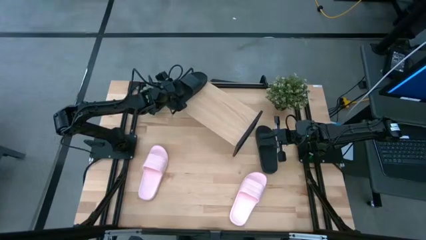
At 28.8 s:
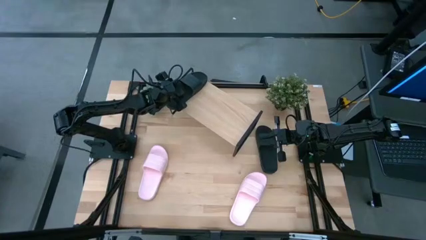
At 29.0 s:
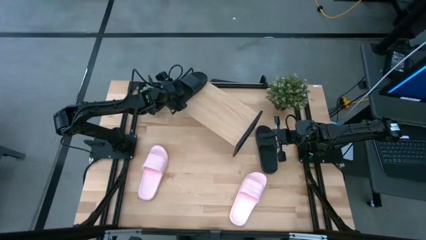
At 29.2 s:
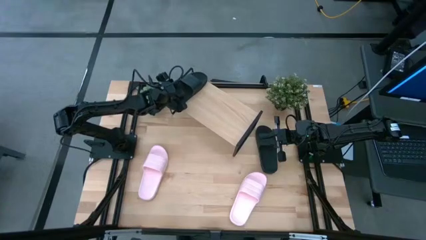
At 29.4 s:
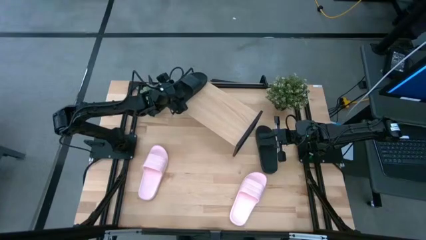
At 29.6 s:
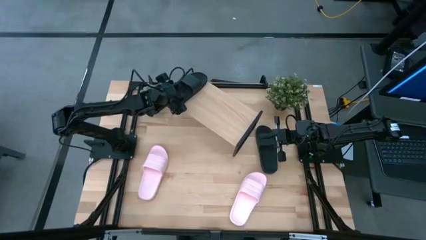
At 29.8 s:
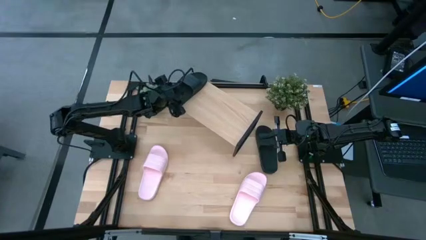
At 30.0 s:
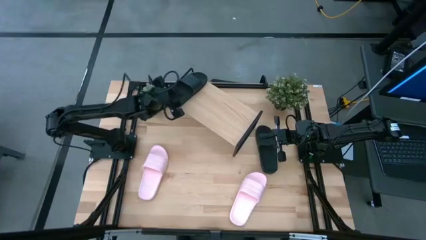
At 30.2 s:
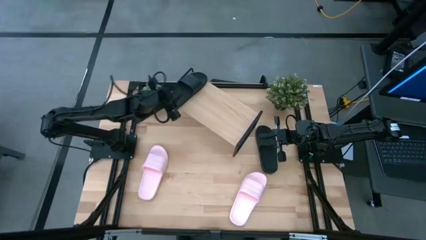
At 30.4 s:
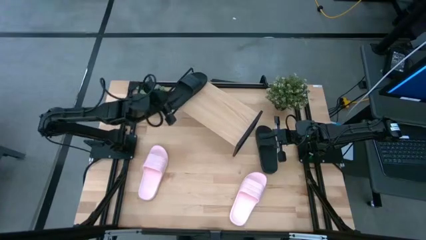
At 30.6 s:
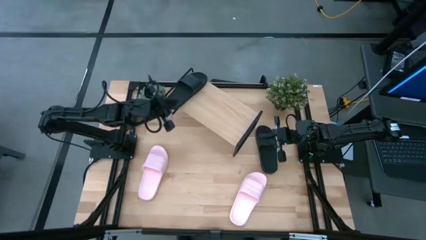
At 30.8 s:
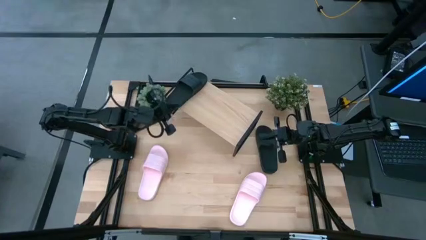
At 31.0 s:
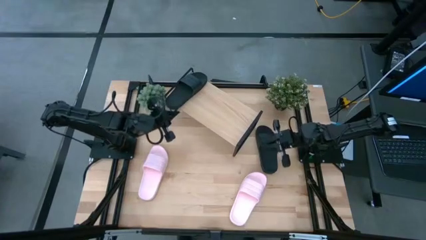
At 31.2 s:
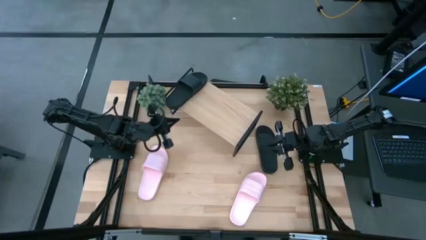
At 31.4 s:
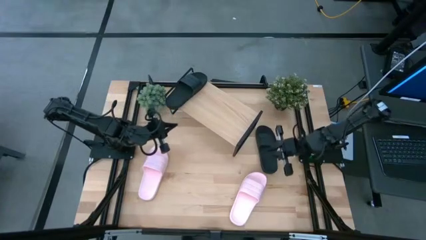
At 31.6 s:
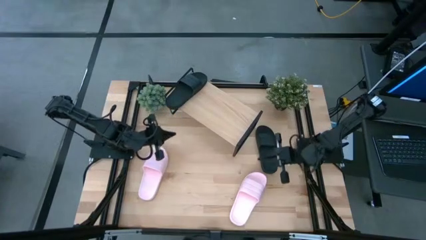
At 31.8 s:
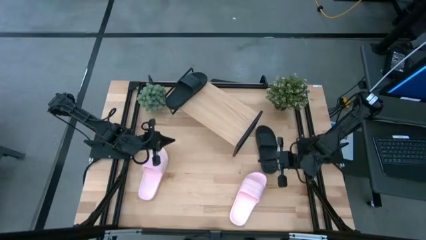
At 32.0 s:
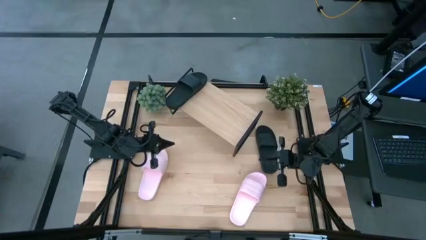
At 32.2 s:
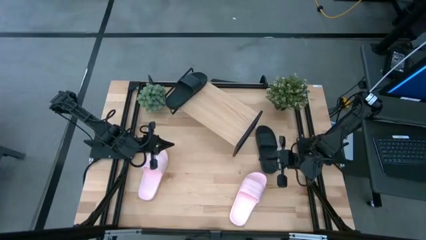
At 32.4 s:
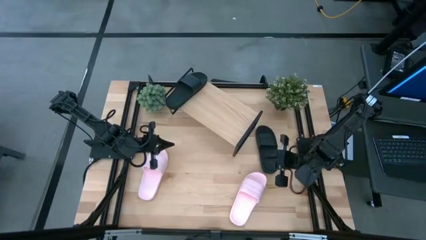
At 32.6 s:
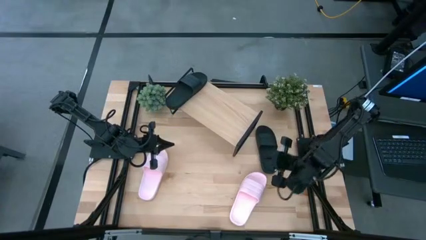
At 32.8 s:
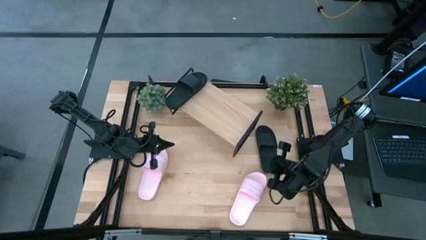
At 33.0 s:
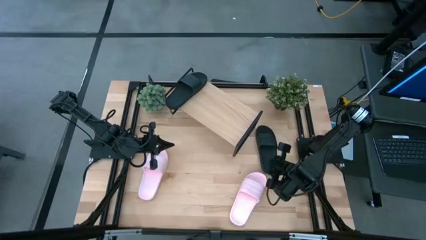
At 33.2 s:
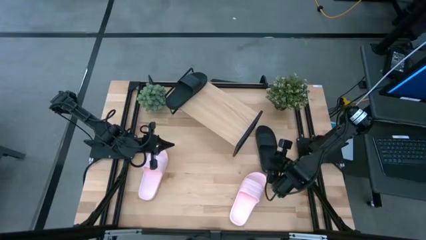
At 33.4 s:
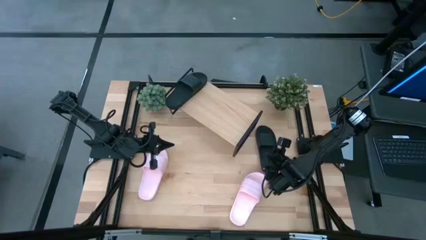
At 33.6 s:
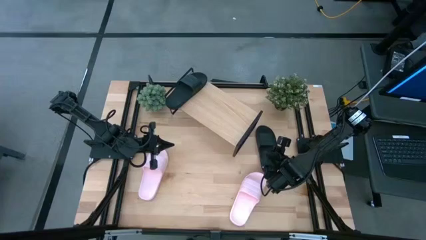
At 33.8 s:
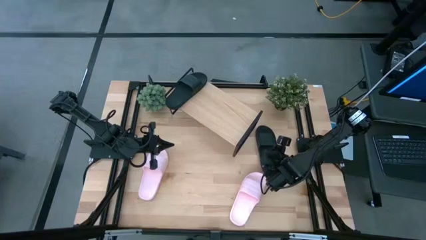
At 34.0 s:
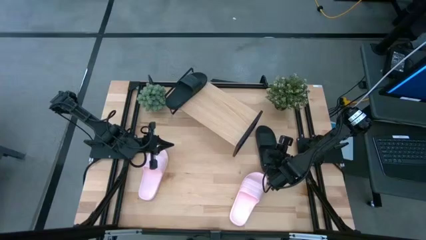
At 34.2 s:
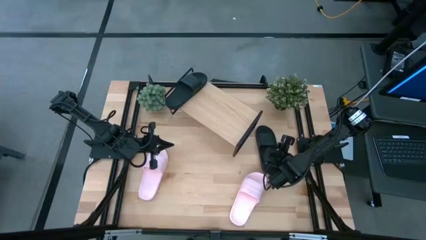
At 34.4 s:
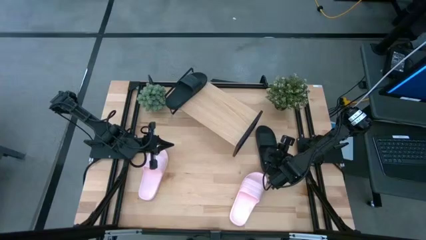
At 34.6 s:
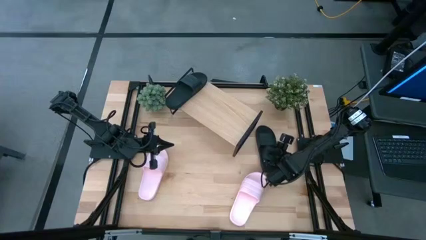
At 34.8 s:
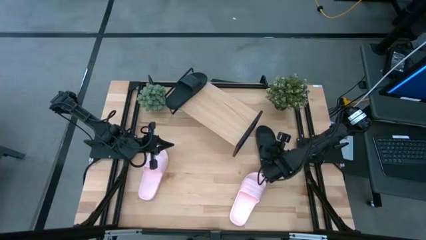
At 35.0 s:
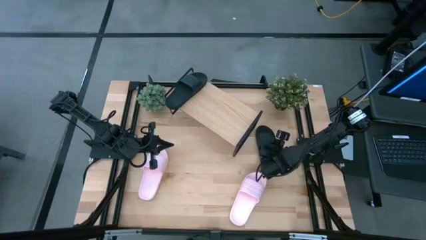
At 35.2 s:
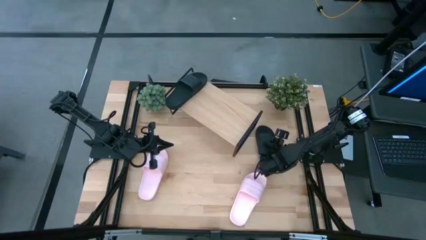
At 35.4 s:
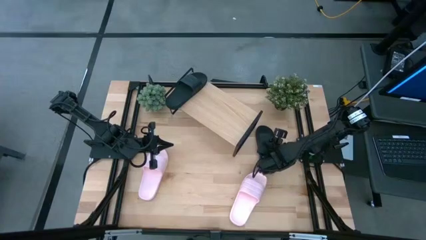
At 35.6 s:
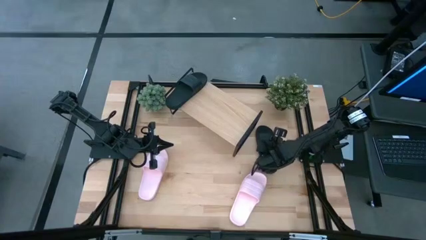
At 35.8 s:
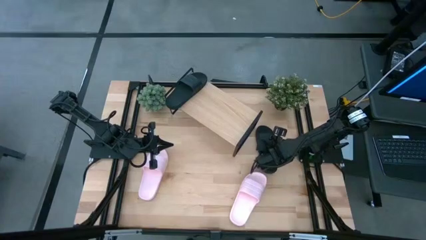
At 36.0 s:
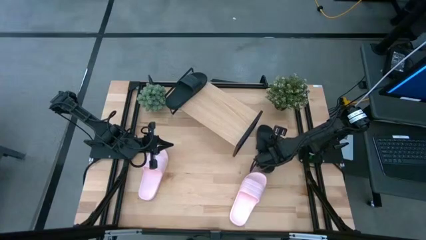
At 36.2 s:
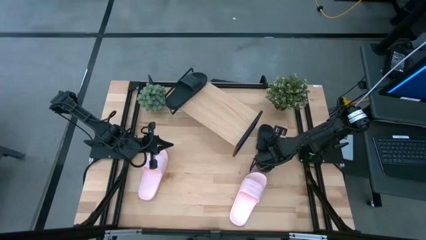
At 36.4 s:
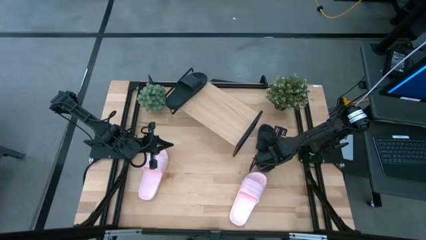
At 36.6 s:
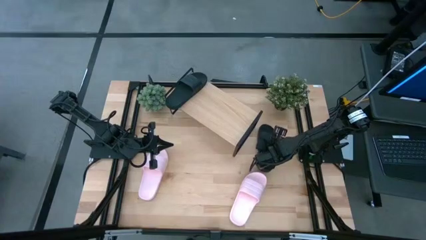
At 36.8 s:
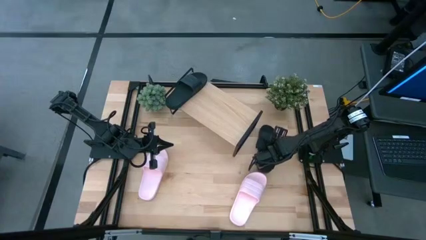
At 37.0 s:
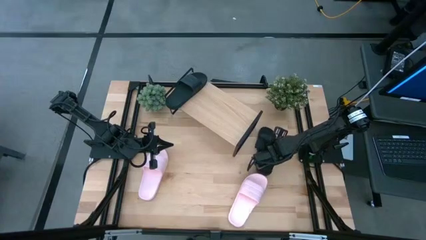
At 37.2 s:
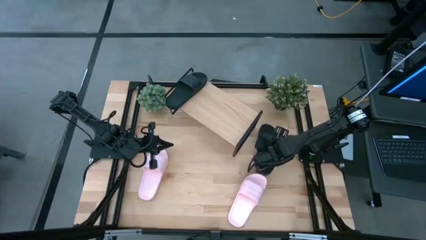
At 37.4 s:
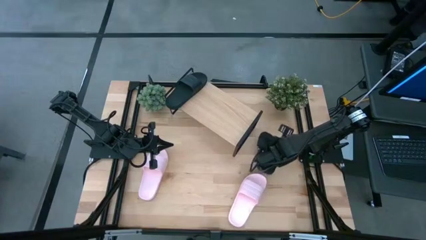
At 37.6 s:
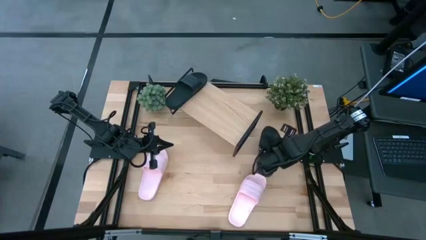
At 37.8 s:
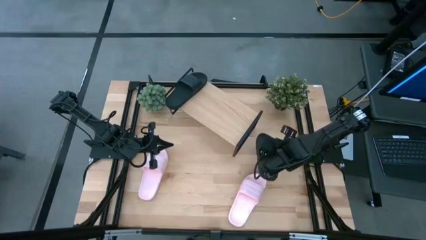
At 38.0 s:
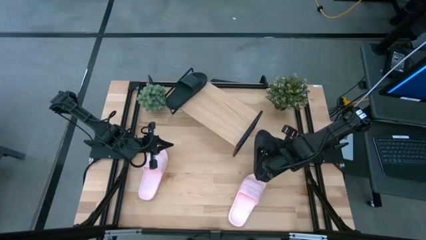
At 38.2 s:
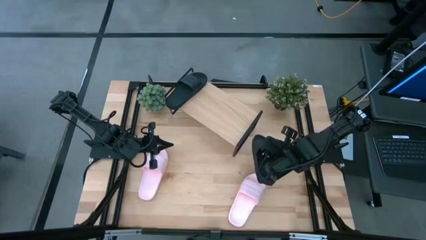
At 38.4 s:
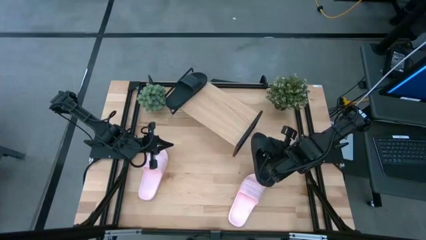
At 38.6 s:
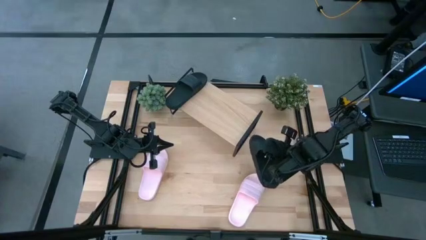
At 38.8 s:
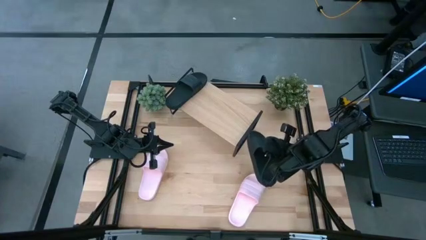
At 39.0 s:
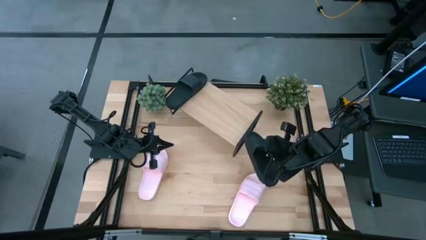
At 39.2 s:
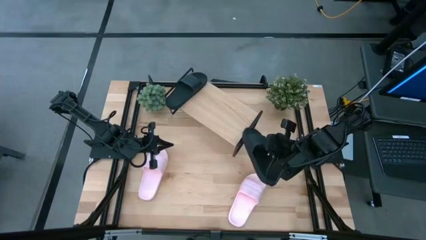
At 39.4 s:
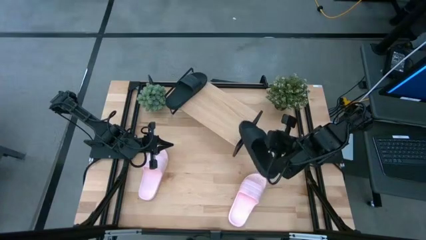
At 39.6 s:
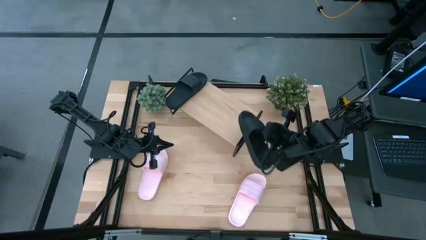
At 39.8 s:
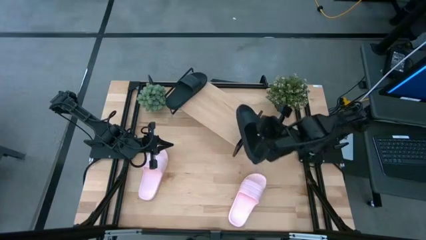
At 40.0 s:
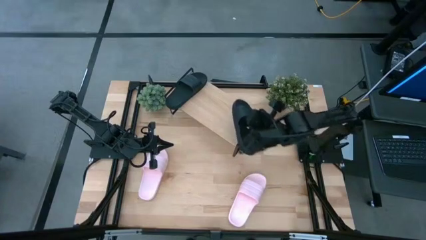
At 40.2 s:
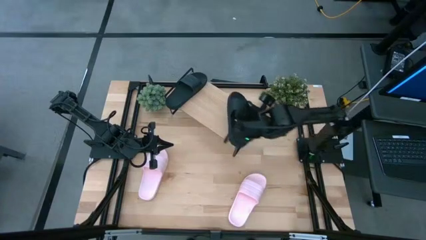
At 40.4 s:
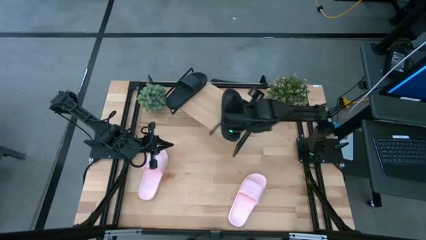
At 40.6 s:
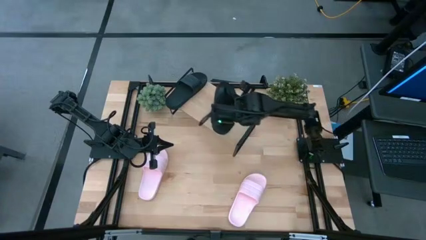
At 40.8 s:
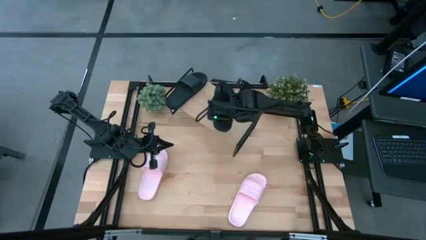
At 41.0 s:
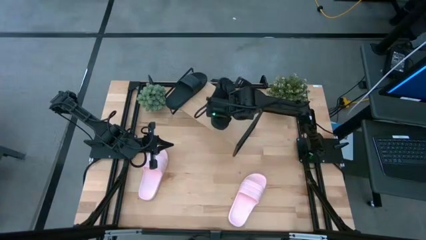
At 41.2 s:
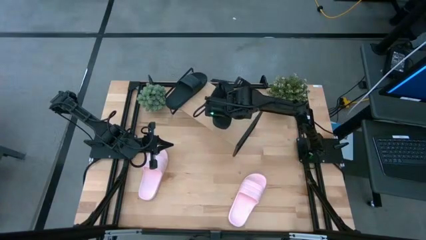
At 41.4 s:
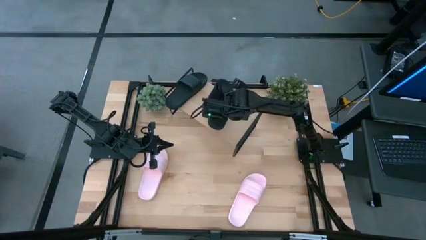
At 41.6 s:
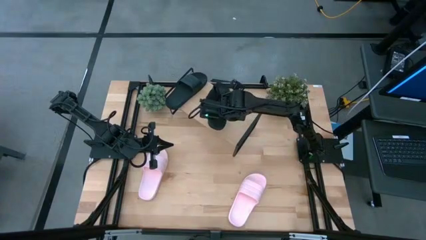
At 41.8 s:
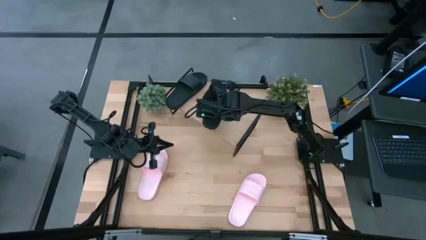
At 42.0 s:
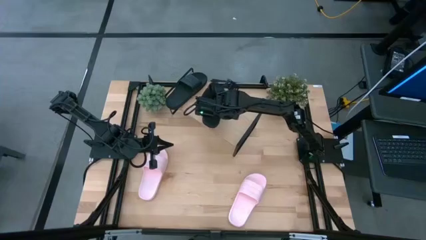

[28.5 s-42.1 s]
Task: Pick and place slides into the shelf
Put the black slide on the shelf
